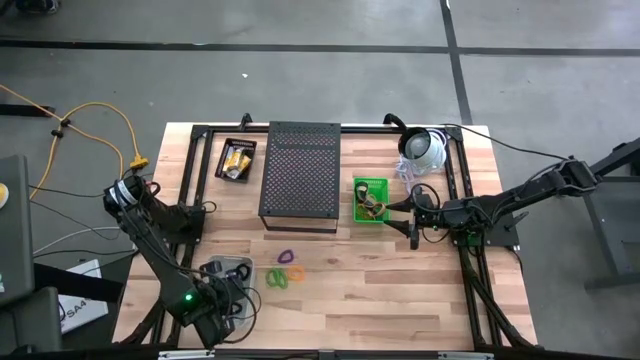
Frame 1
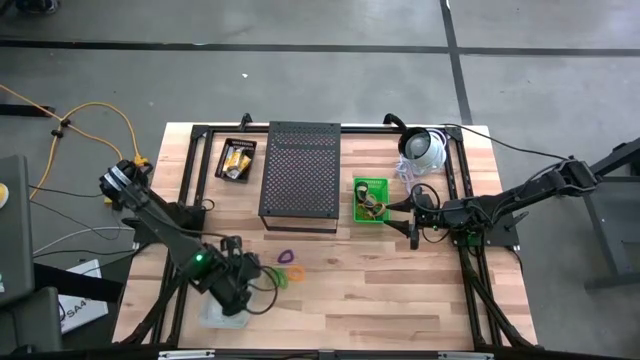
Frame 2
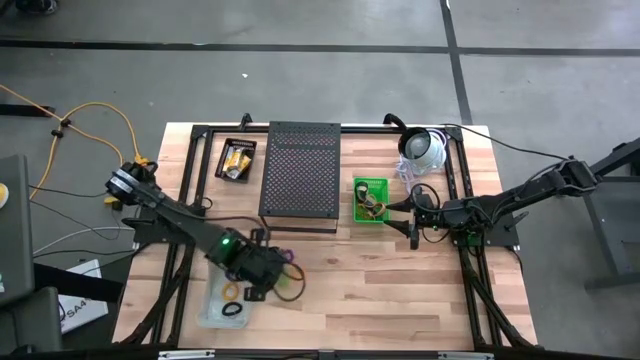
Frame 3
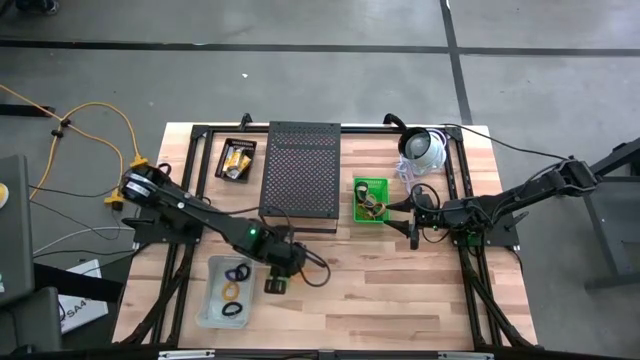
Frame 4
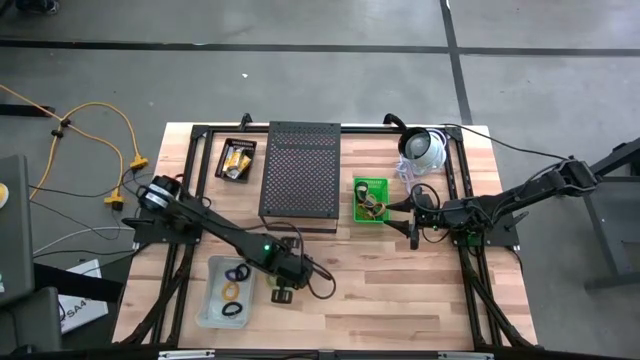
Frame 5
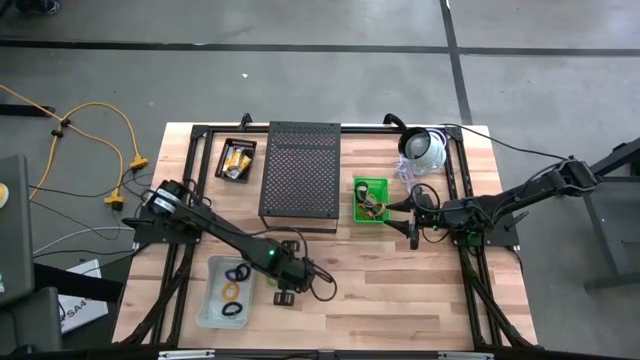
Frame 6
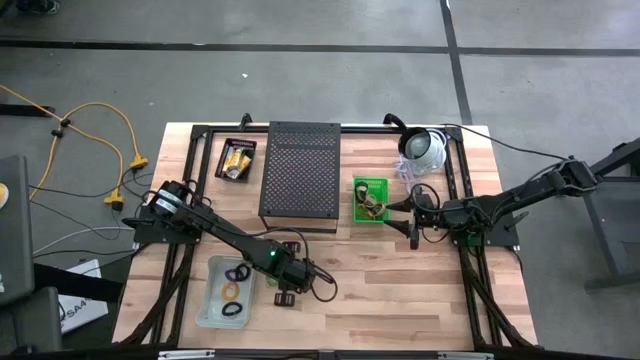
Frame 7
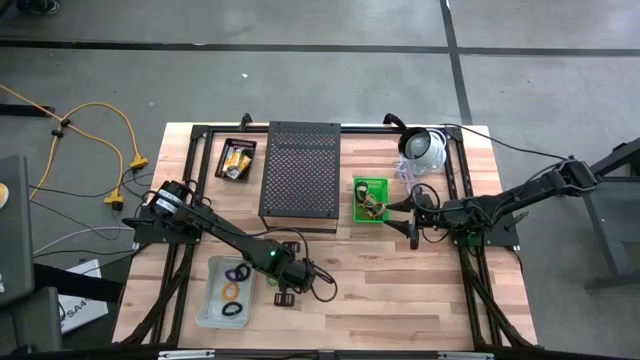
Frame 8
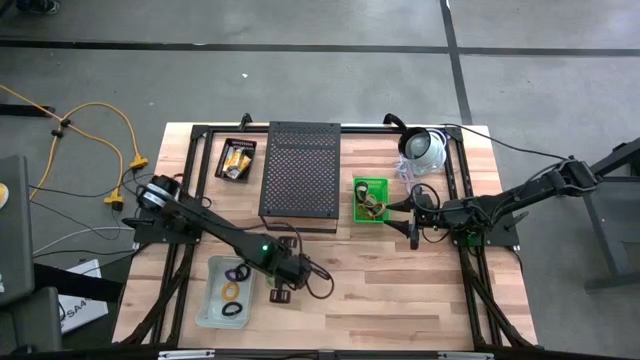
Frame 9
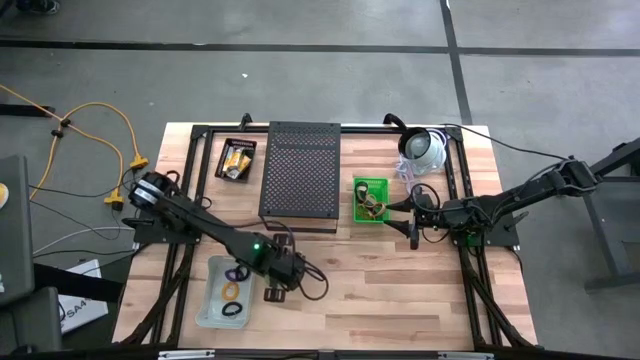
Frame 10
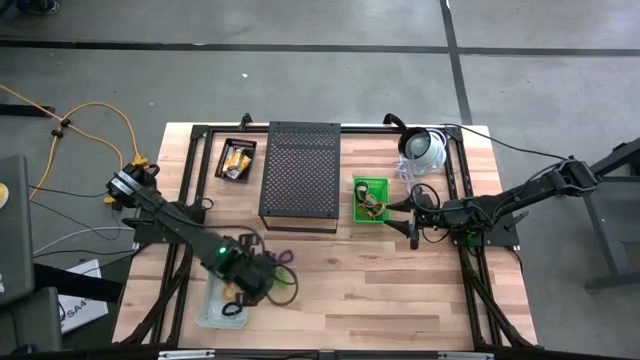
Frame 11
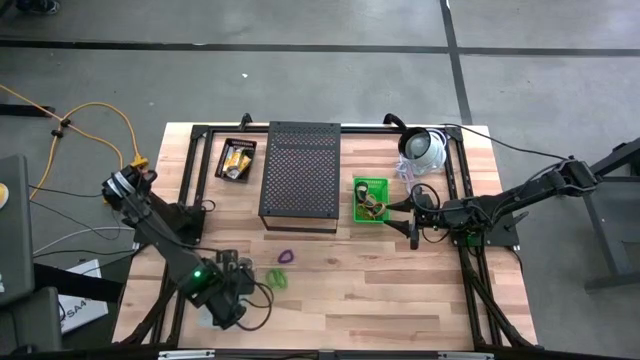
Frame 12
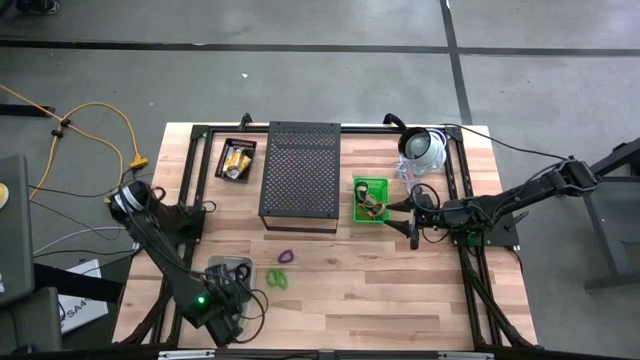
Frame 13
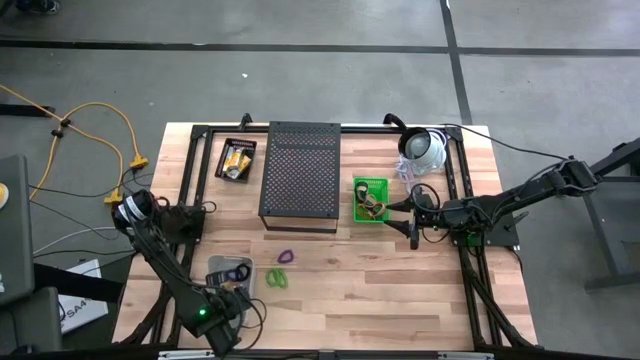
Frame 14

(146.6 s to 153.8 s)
Task: Pick & Place Office Desk Supplies
Put the yellow spring keychain into the gray bin

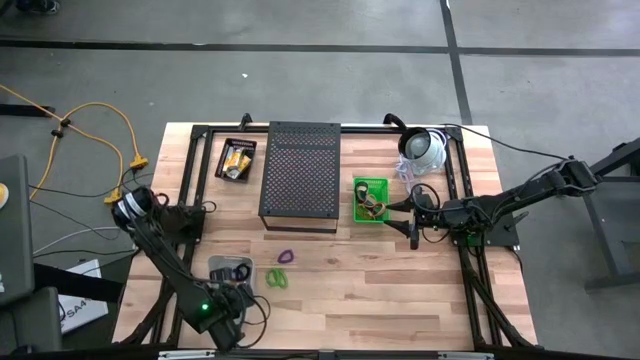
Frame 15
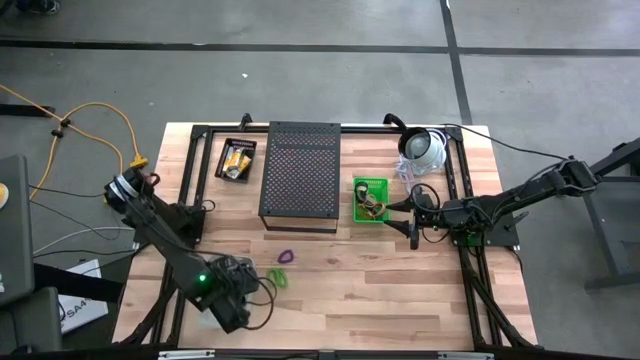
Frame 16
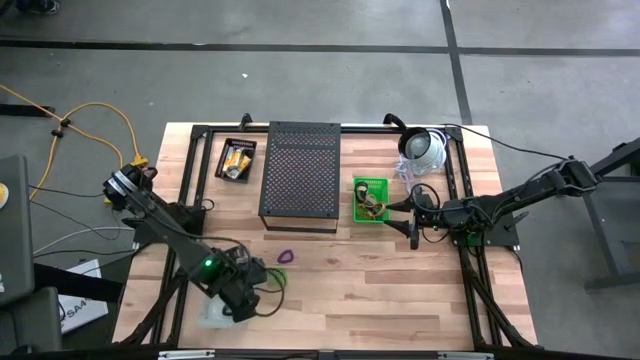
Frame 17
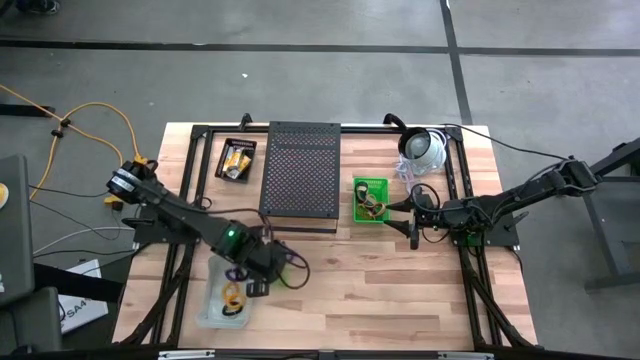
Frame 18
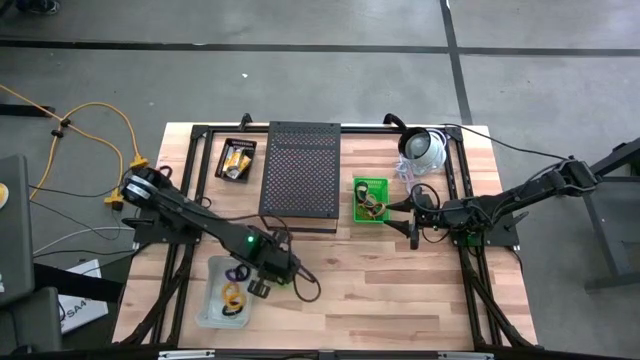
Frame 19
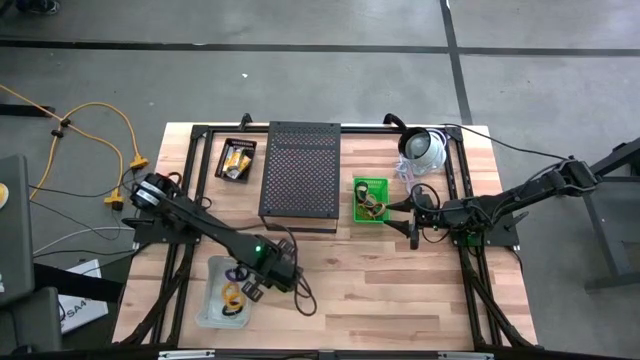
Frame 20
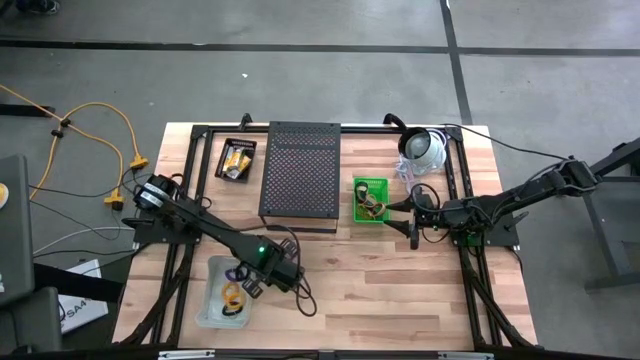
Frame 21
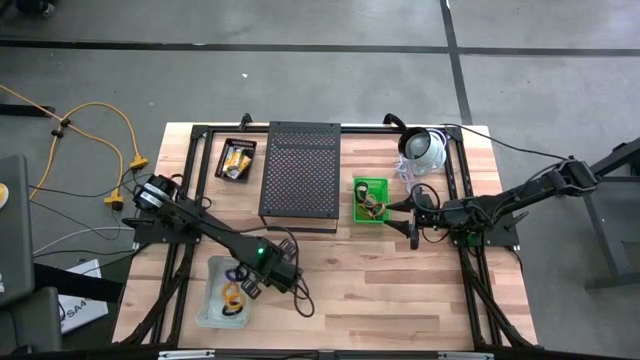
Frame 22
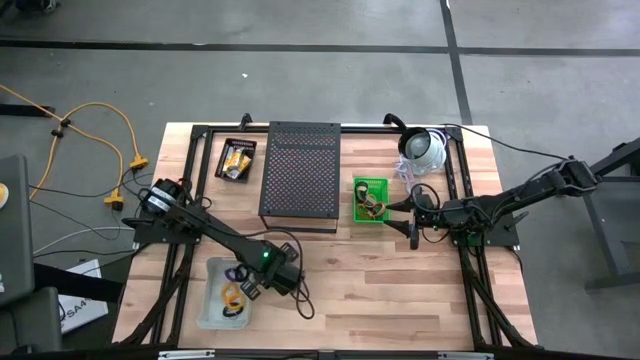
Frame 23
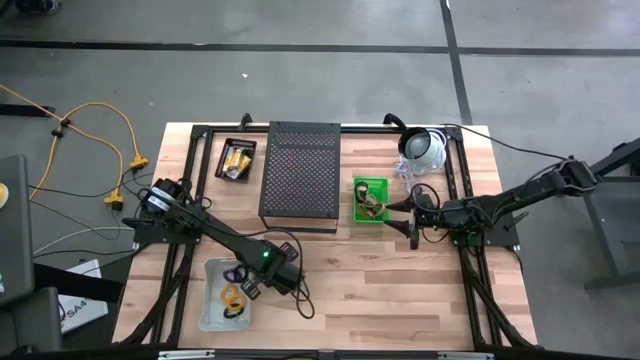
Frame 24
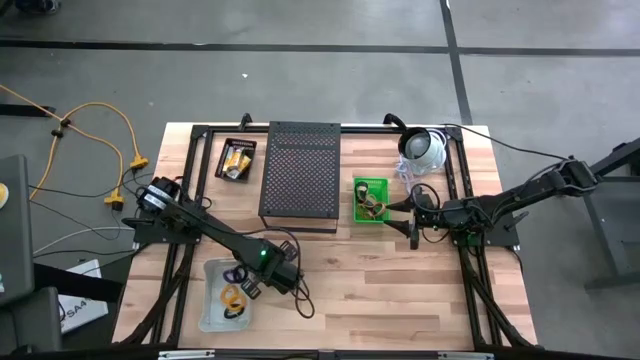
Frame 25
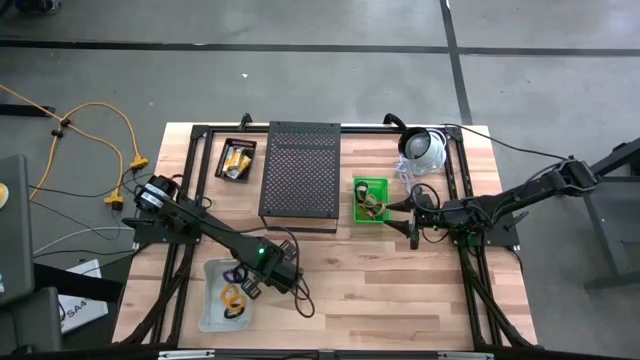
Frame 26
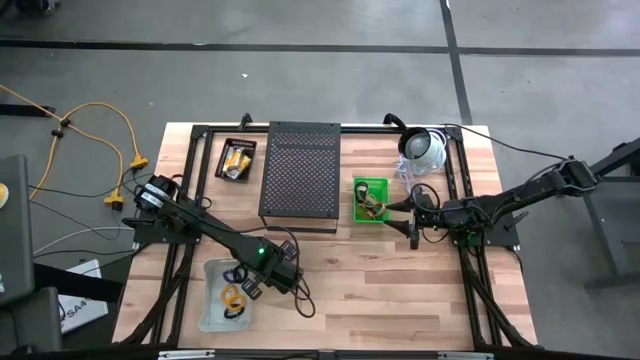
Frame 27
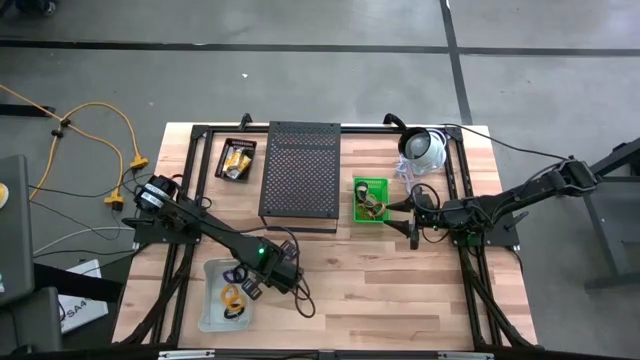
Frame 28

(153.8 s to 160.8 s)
Put the green spring keychain into the gray bin

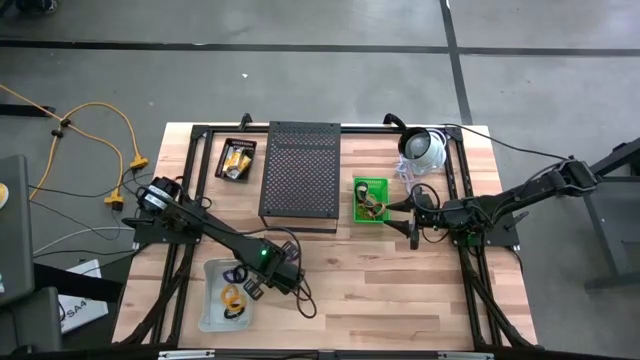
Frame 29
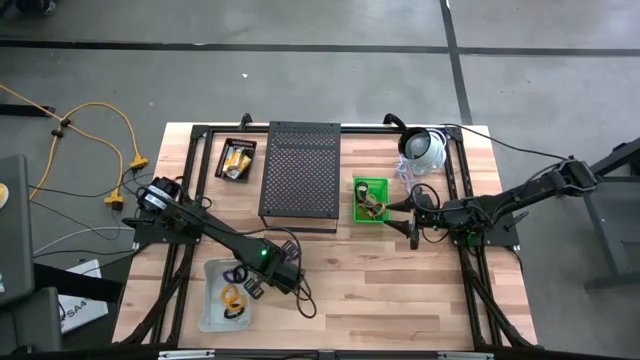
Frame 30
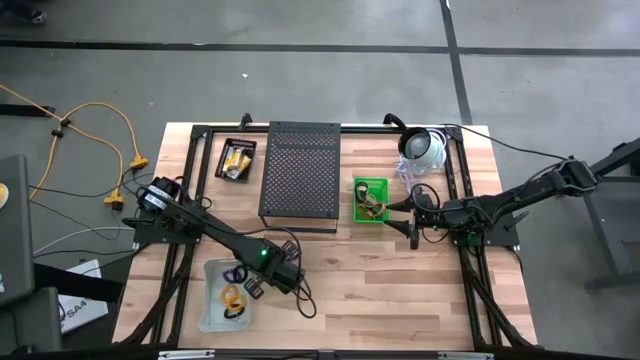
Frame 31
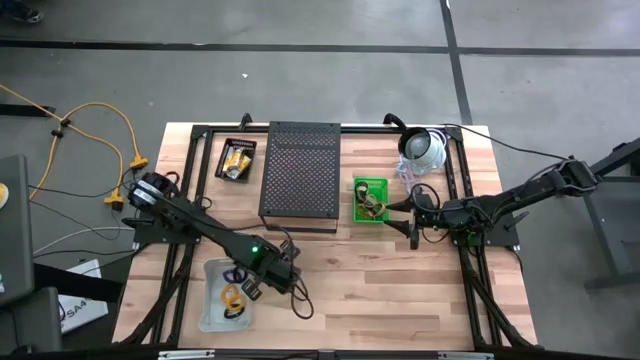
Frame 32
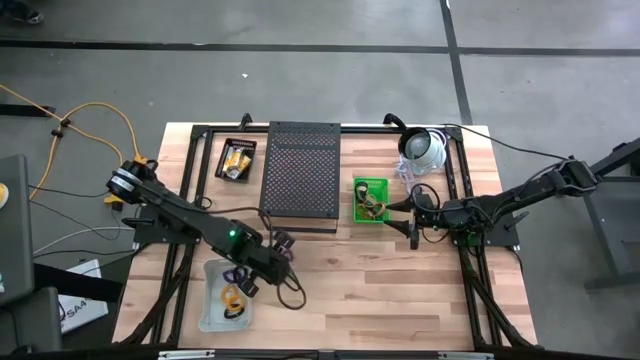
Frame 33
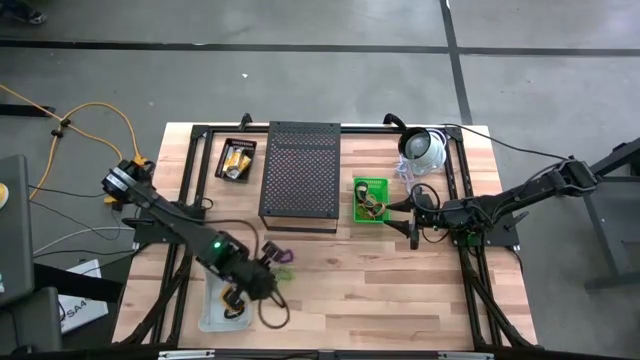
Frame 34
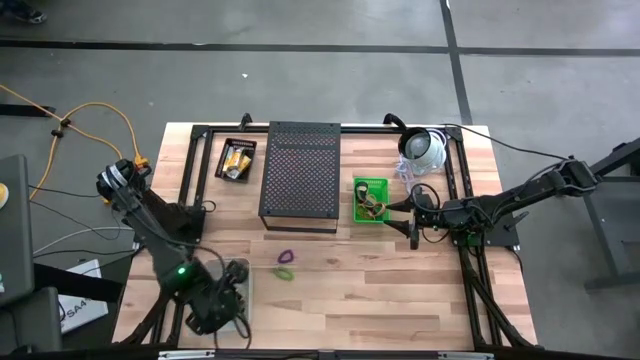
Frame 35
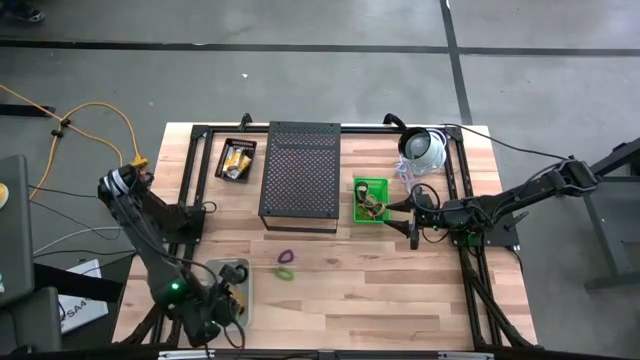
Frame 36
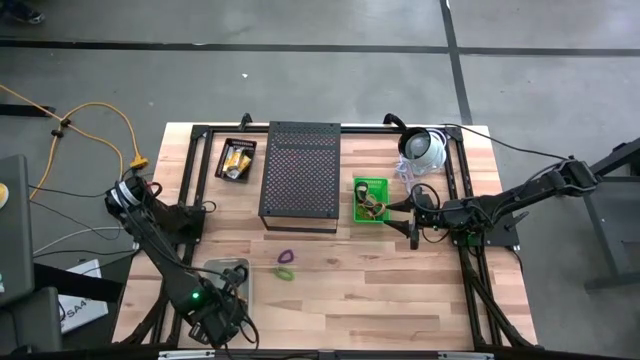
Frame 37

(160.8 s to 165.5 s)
Put the green spring keychain into the gray bin

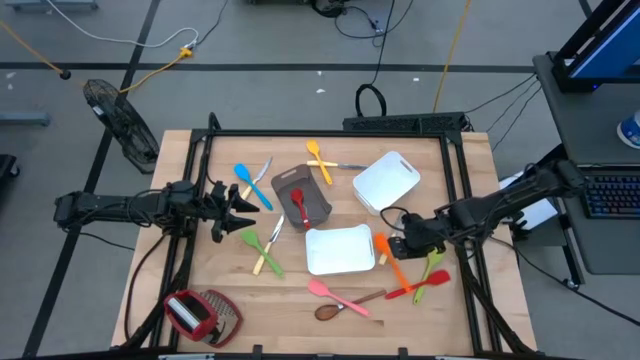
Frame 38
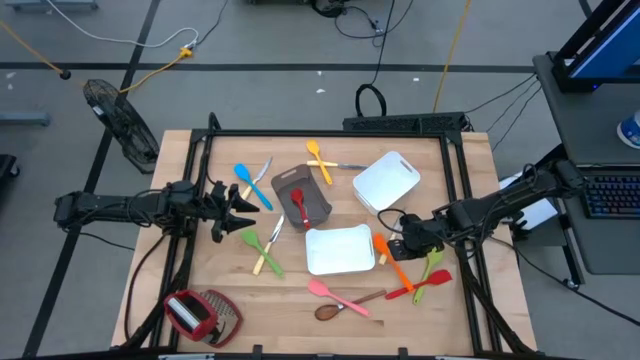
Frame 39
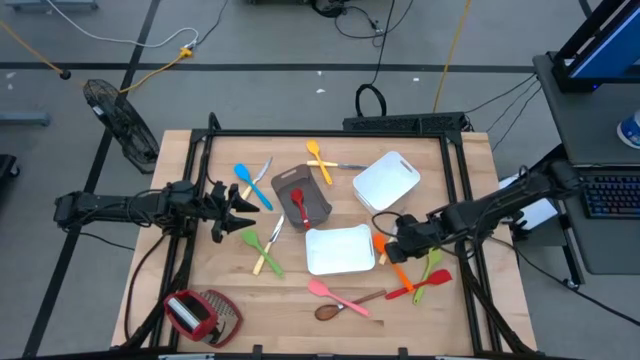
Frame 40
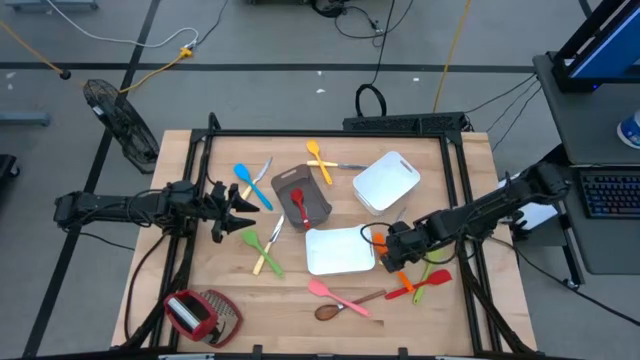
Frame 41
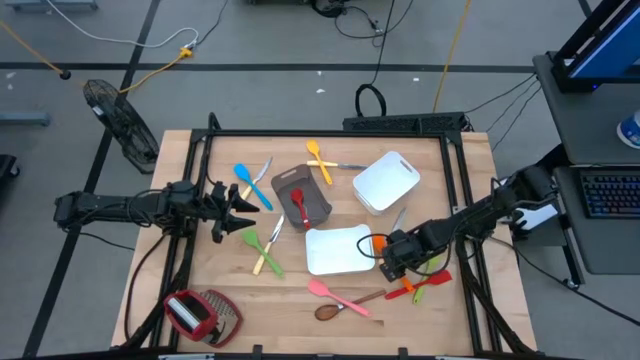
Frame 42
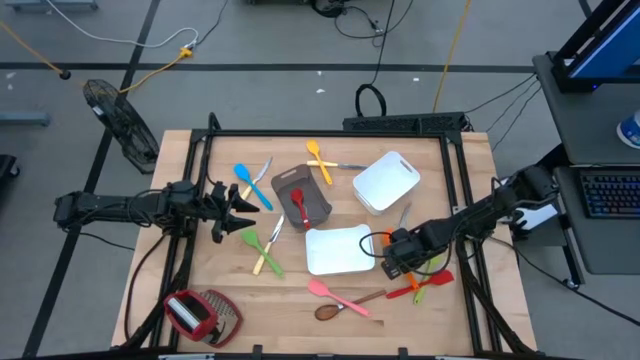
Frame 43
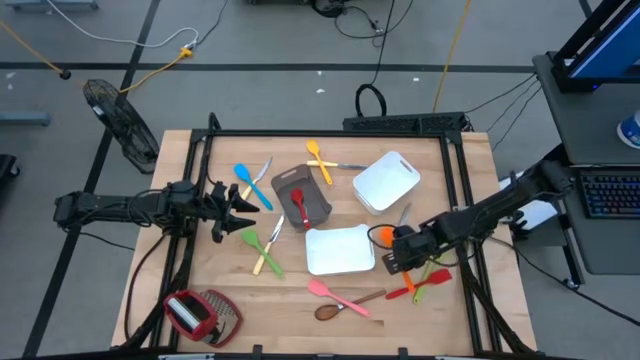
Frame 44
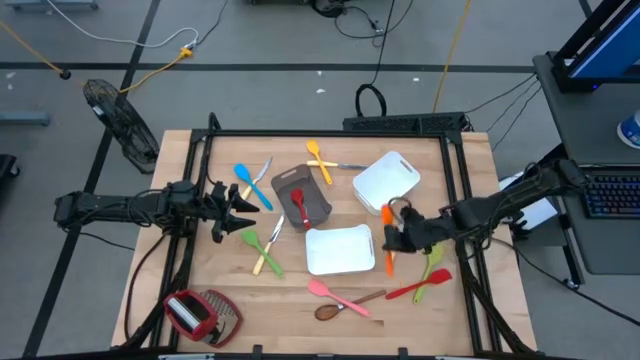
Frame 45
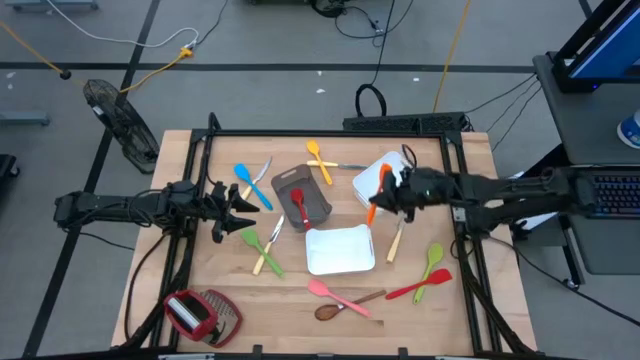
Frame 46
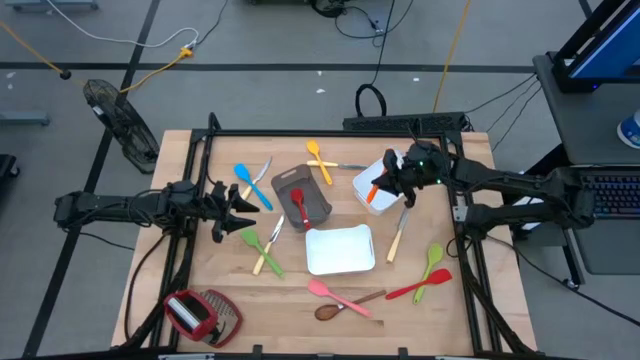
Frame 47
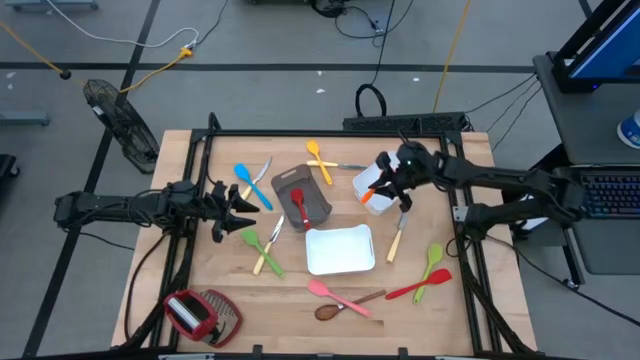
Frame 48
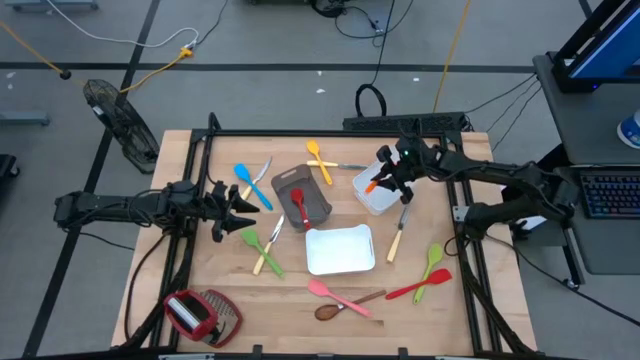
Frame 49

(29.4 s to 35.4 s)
Task: Pick & Place Kitchen Items
Put the orange spatula into the top white bin
